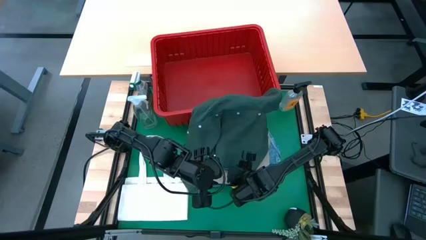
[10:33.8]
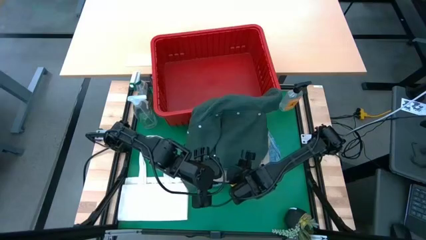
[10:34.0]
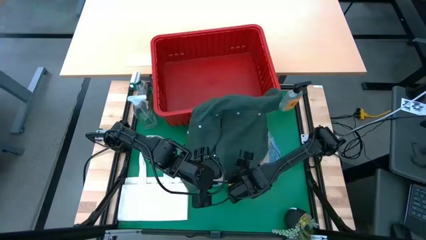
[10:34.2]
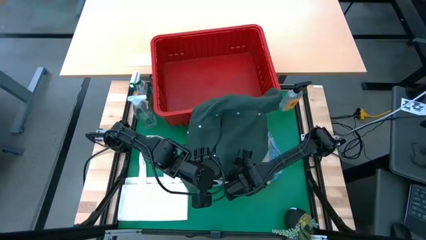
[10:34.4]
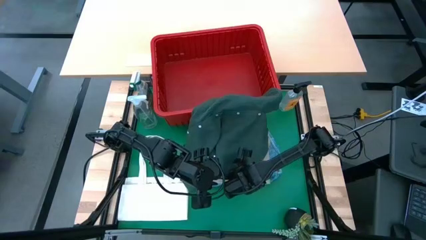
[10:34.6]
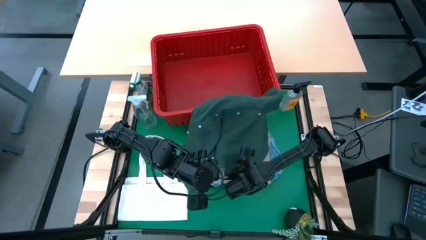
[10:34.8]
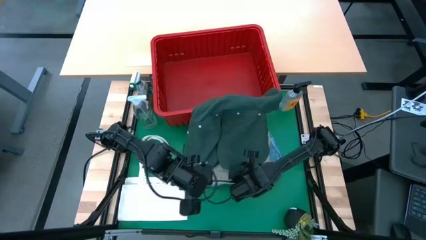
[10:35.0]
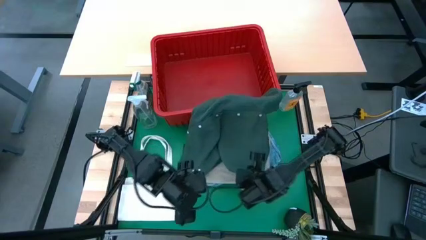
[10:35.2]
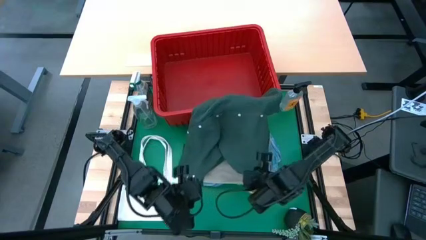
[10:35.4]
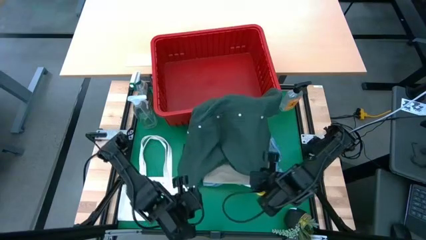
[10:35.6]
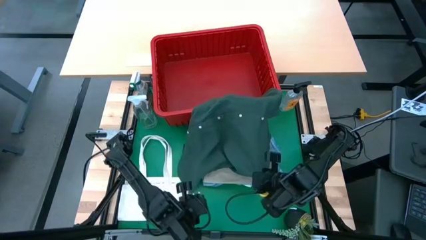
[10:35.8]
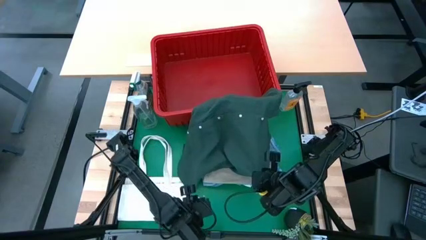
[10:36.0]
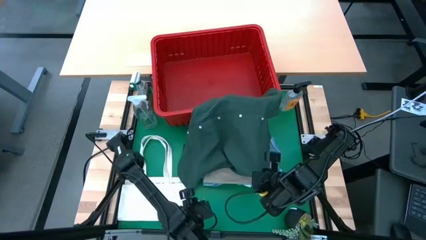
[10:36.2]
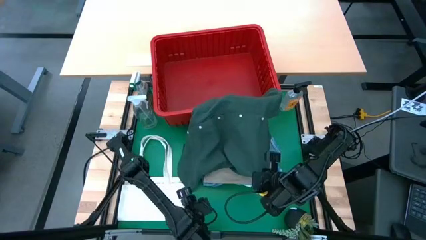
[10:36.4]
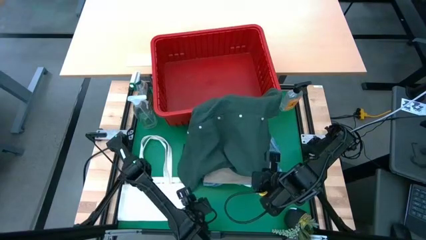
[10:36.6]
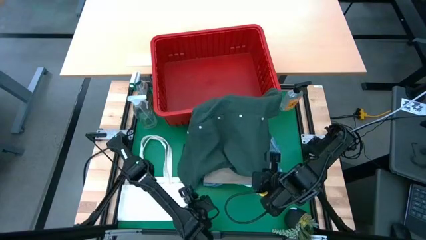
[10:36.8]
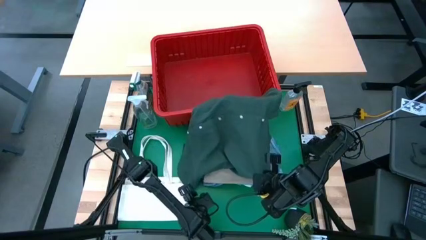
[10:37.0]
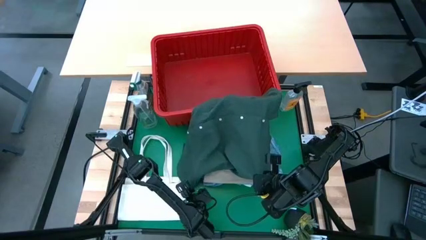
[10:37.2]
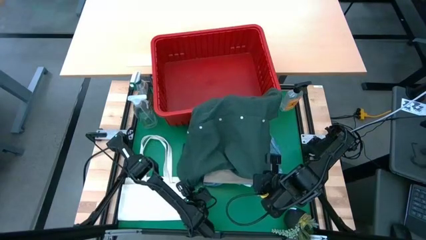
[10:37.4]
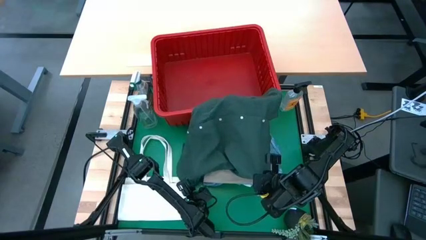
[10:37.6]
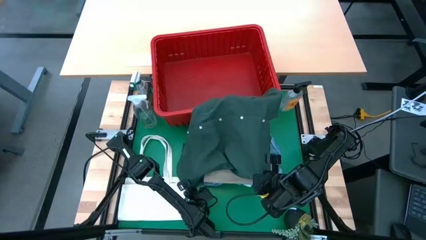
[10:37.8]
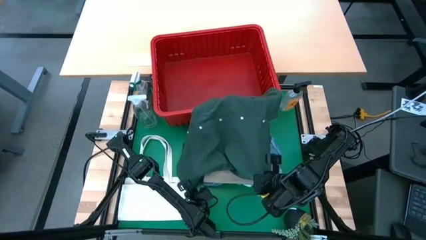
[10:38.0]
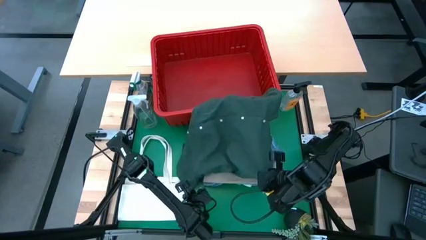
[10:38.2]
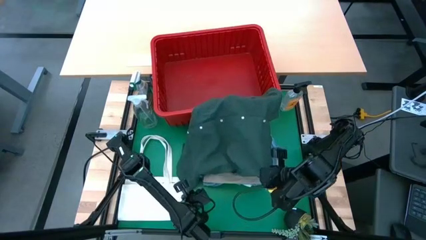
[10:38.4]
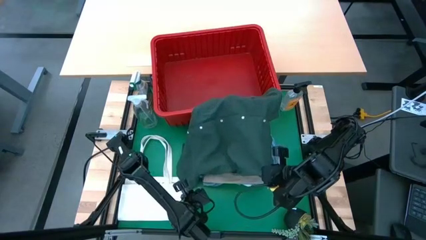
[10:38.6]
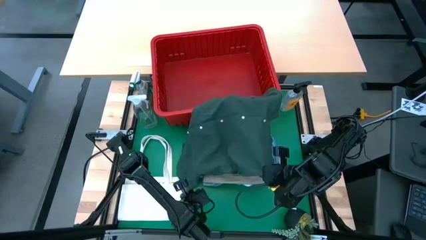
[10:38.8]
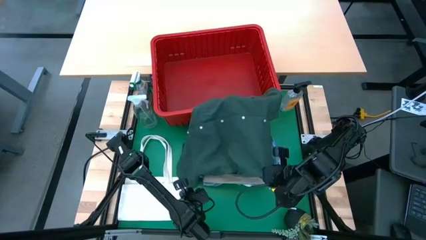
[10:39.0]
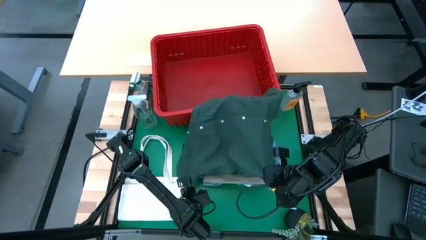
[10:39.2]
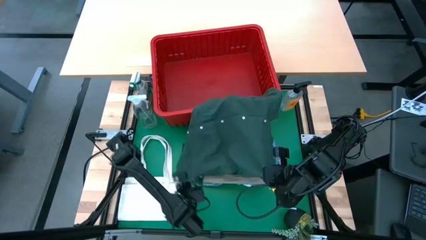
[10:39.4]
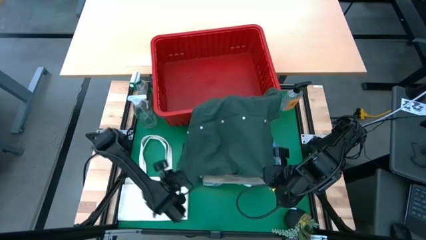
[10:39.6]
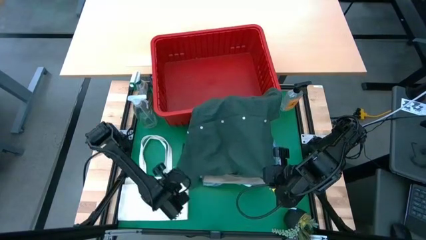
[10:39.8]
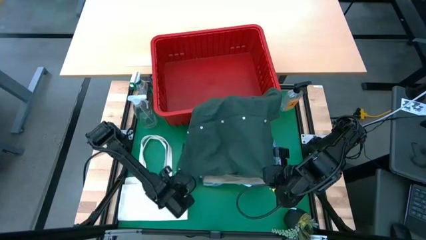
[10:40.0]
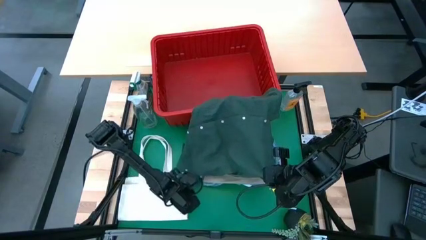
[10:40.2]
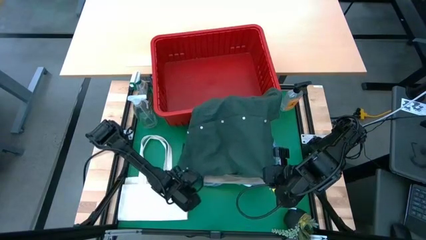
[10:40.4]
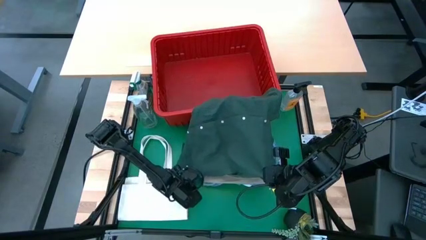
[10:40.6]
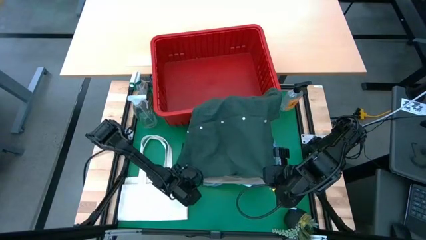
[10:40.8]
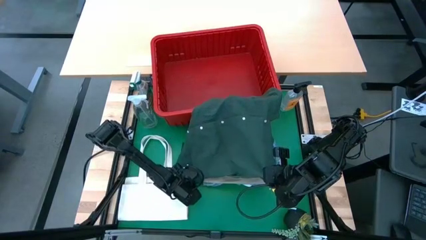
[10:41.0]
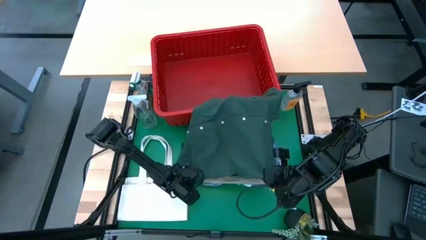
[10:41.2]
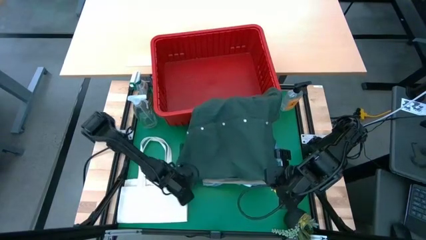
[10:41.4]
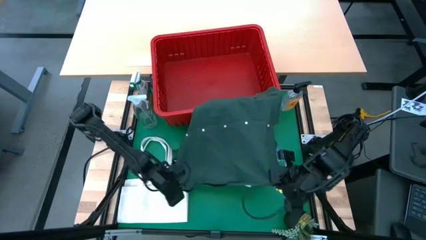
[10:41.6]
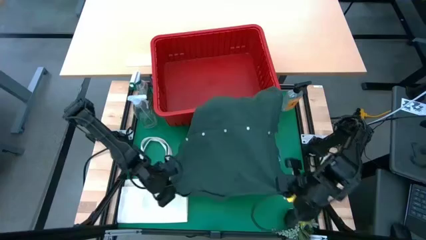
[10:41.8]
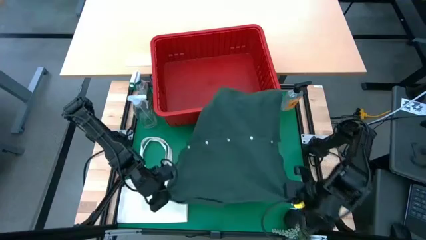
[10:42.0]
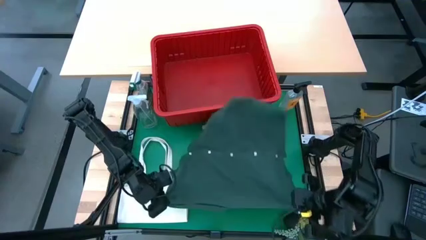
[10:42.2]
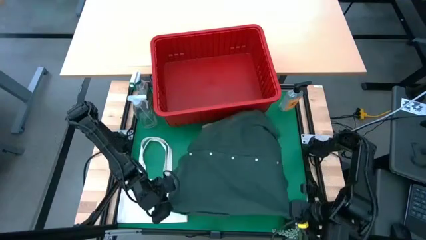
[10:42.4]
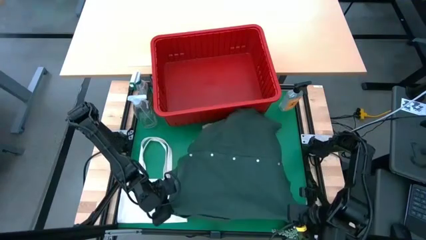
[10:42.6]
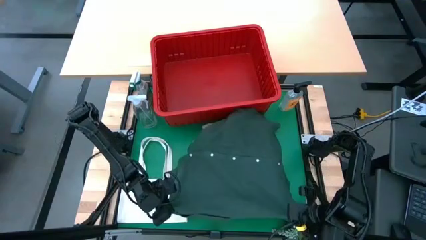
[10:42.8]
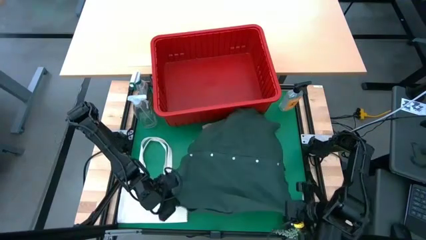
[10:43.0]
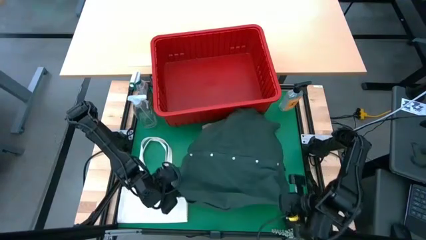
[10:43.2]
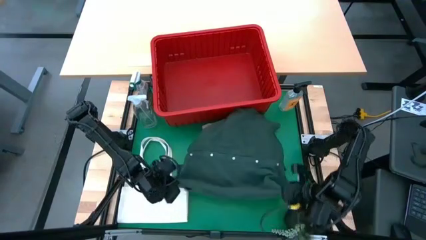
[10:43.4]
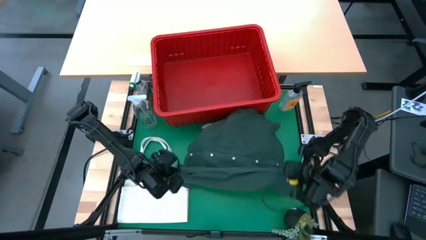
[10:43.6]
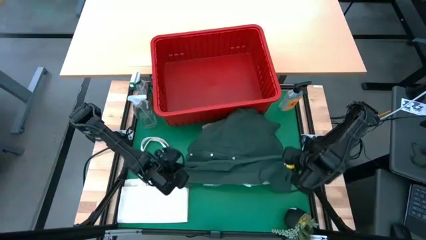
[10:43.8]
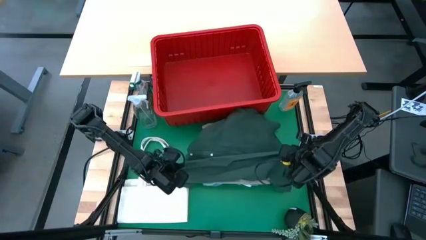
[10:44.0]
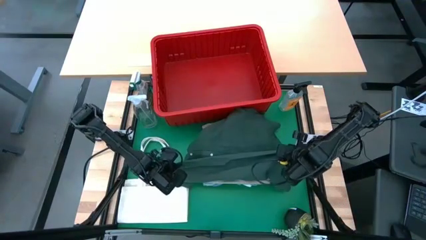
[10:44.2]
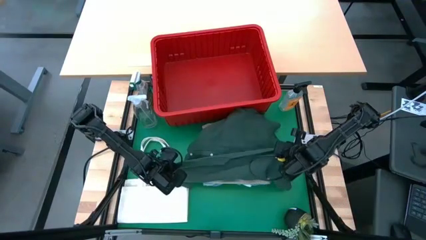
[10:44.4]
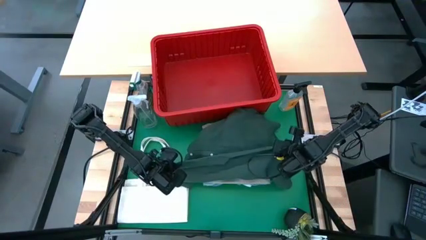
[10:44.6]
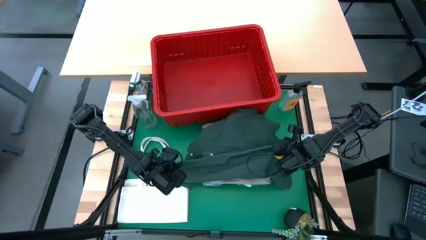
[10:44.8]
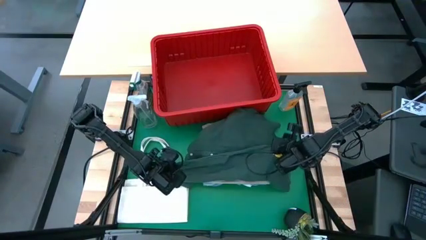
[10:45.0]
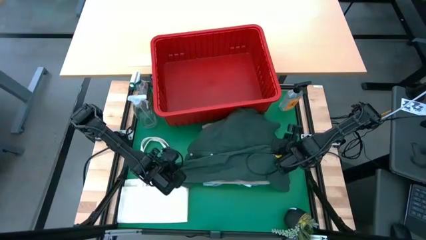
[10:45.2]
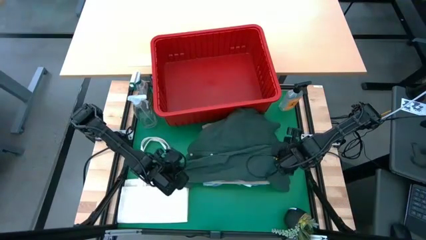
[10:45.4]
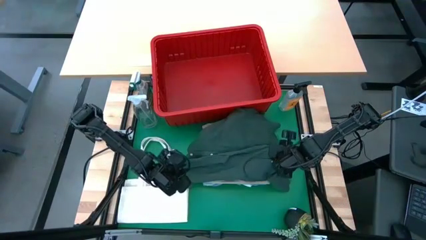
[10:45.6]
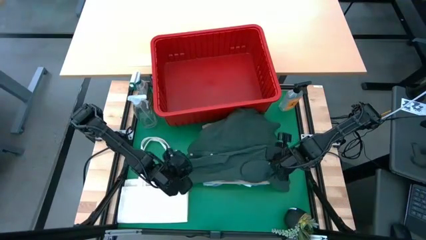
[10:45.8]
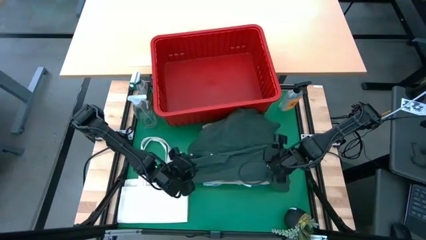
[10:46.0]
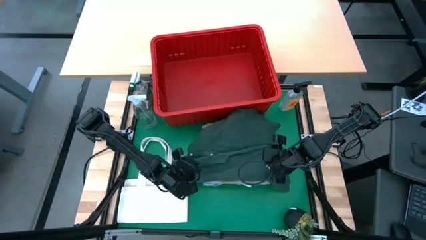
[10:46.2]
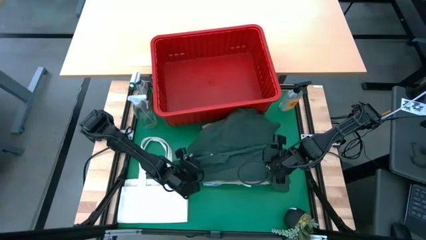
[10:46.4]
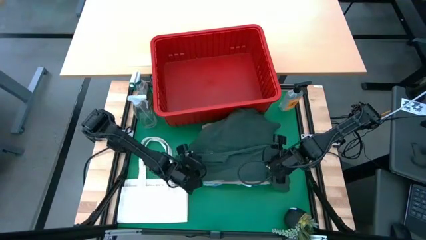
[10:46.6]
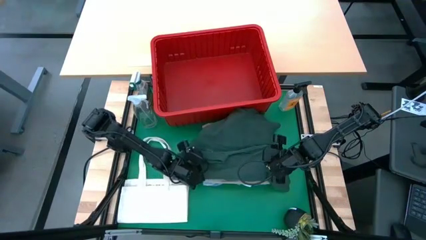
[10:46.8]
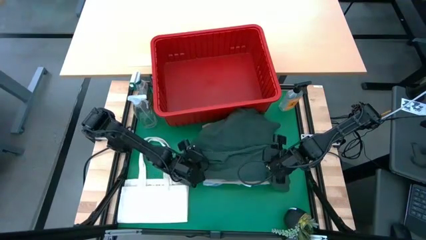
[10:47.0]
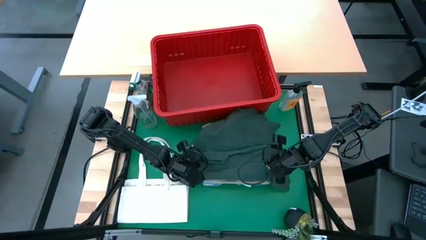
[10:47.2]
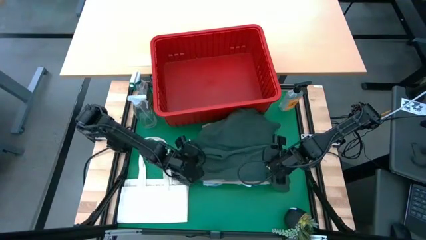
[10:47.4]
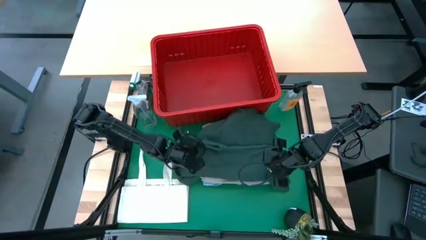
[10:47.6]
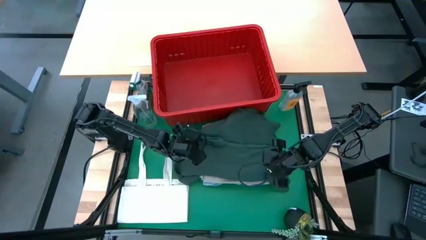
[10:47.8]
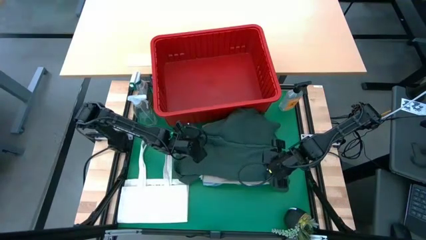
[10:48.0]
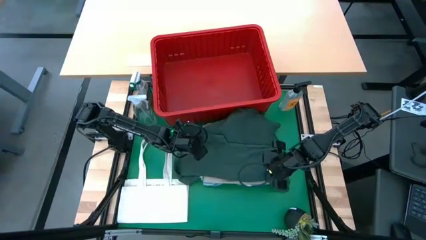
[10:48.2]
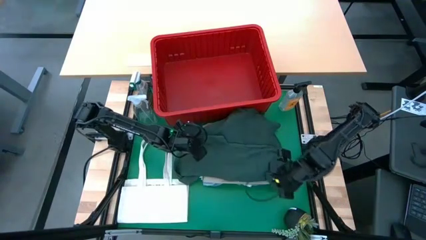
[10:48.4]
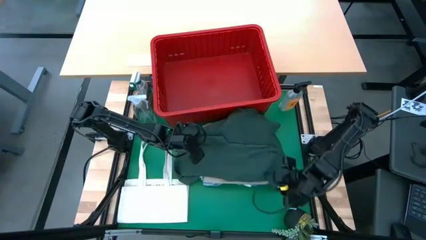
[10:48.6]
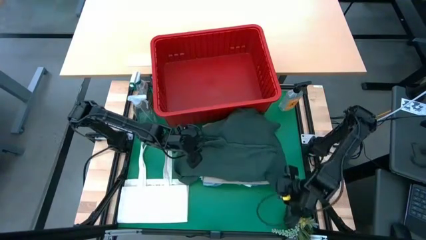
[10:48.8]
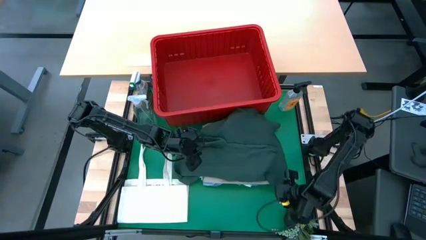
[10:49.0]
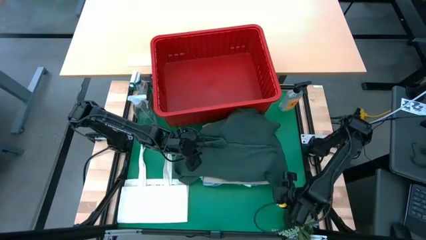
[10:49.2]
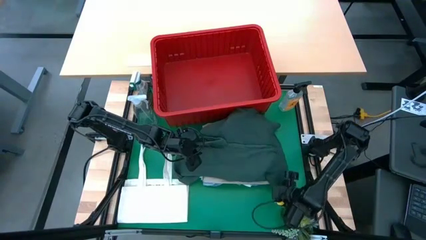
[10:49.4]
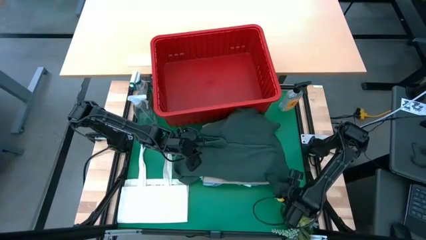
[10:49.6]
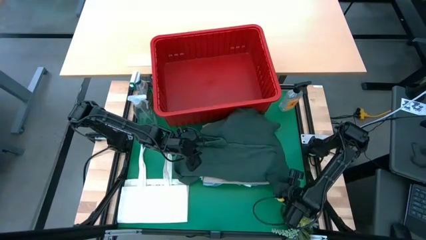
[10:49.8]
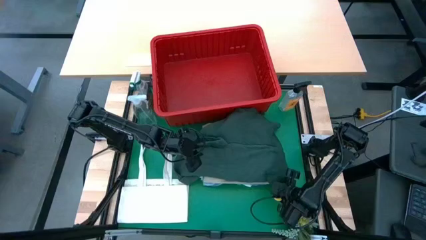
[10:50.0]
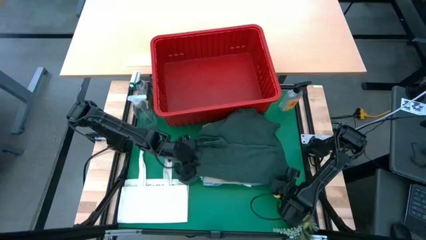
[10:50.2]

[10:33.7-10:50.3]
Task: Fold Laundry from Bin
Fold the green polo shirt
